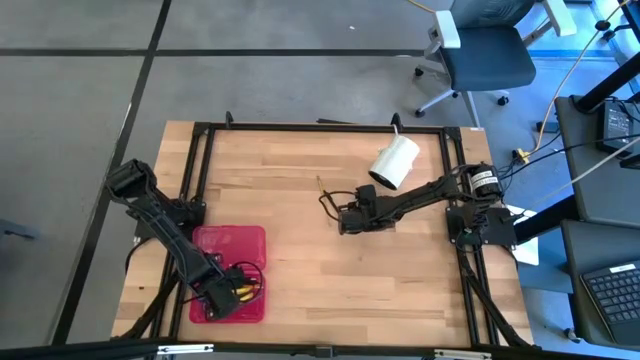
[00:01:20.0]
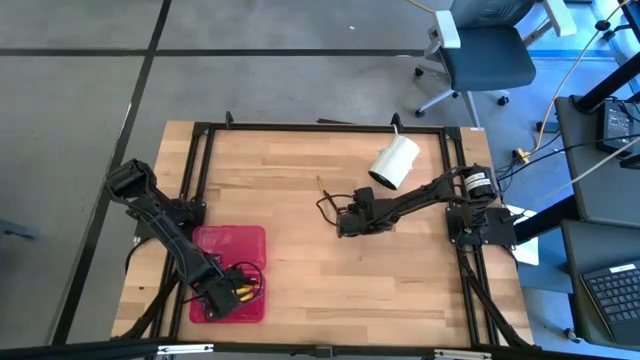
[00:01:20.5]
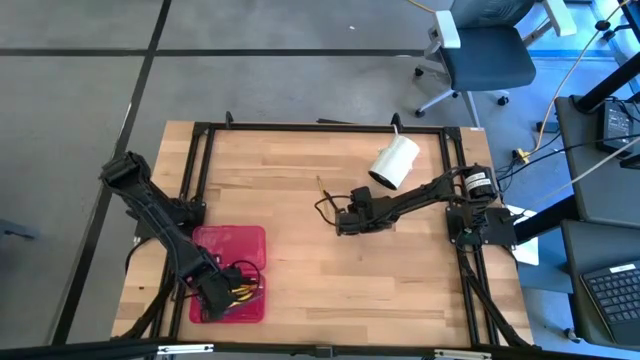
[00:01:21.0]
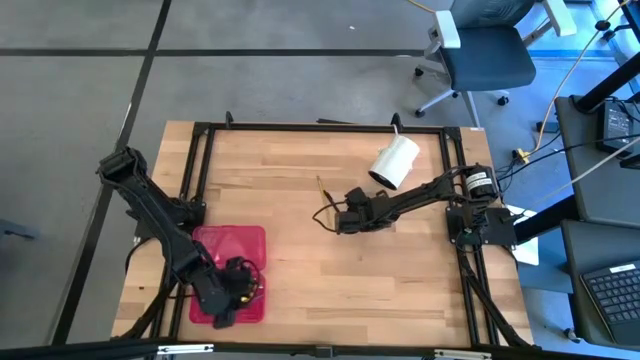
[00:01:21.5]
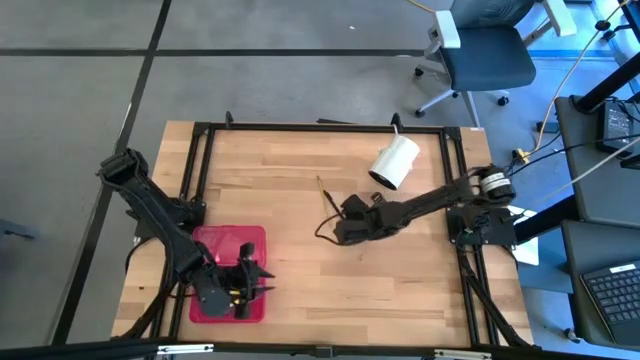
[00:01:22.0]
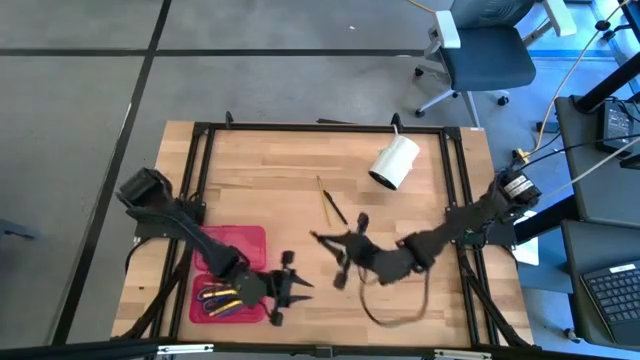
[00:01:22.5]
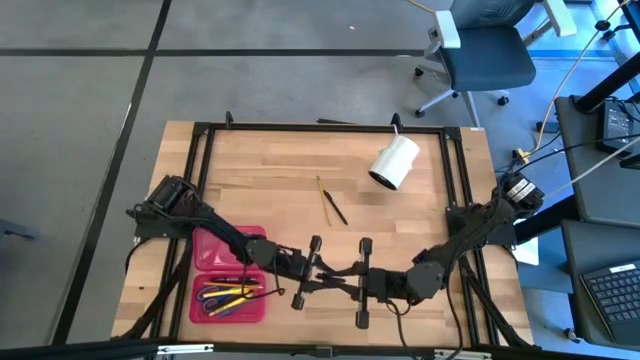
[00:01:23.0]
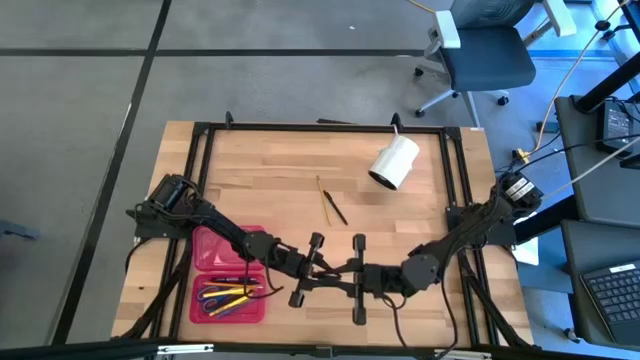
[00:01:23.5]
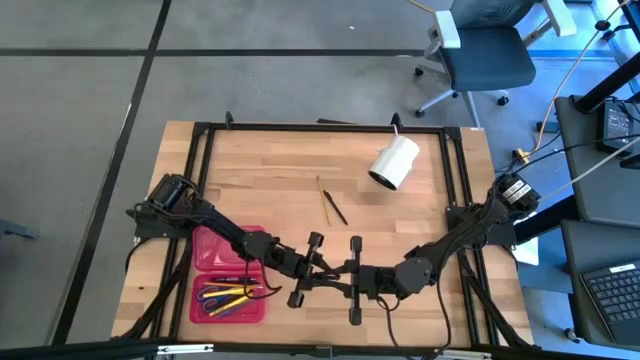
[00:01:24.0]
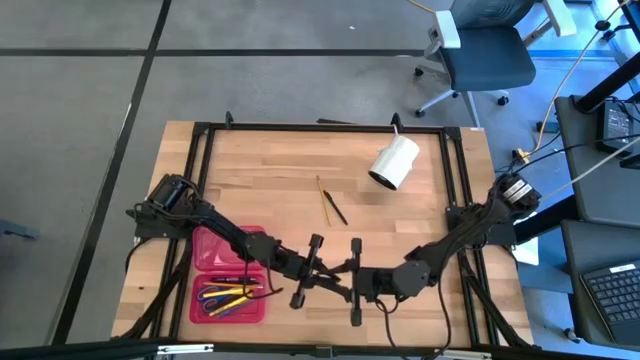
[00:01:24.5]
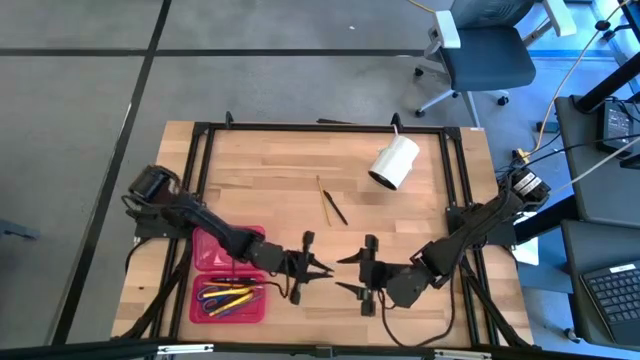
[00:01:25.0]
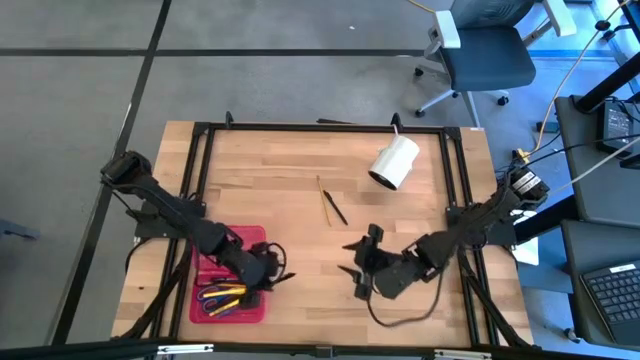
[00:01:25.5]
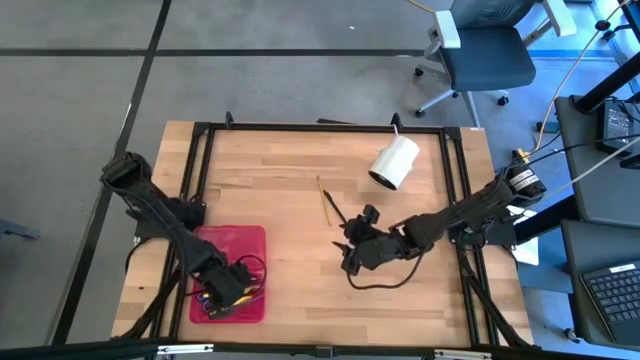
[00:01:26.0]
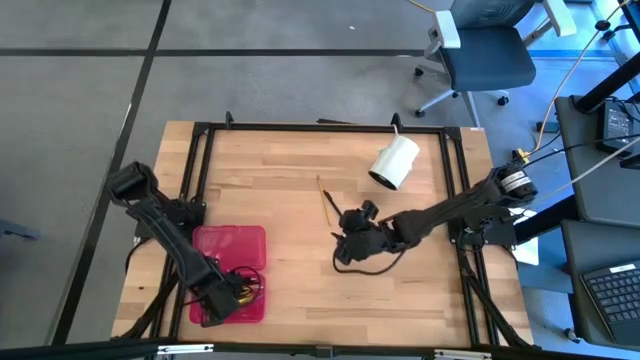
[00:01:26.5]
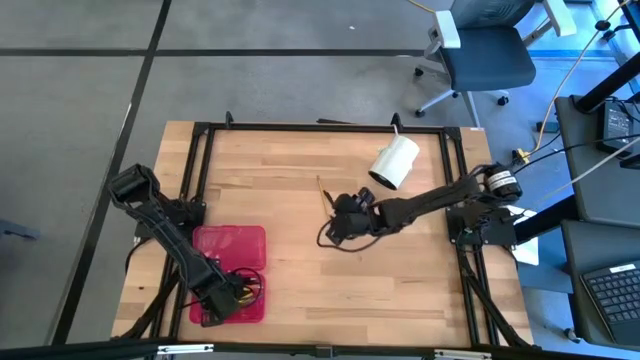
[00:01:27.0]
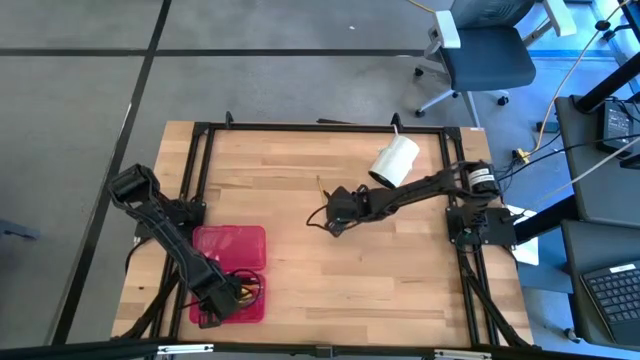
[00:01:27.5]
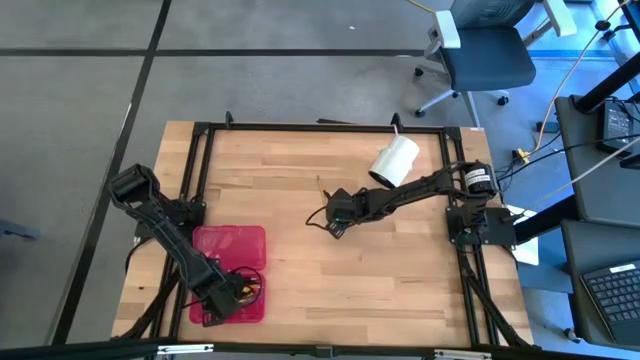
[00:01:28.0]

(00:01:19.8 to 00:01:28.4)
Task: Pick & place school supplies into a supply box
Put the black pen into the red supply box

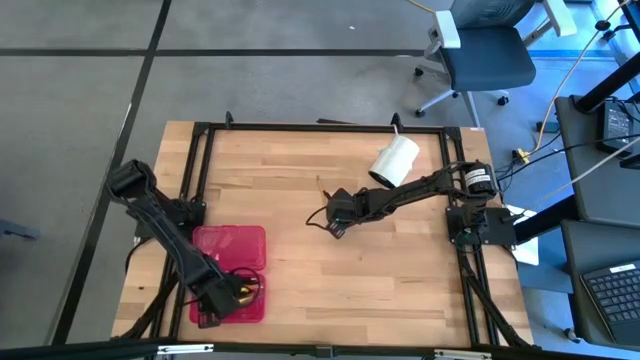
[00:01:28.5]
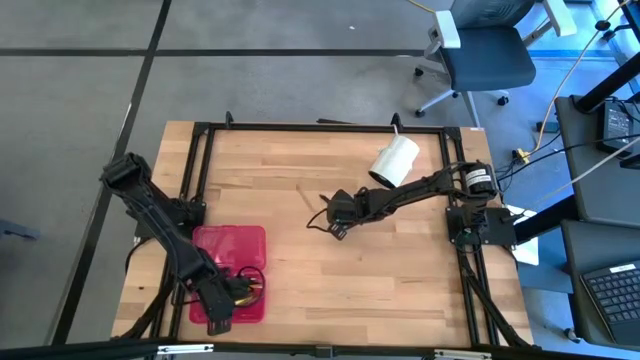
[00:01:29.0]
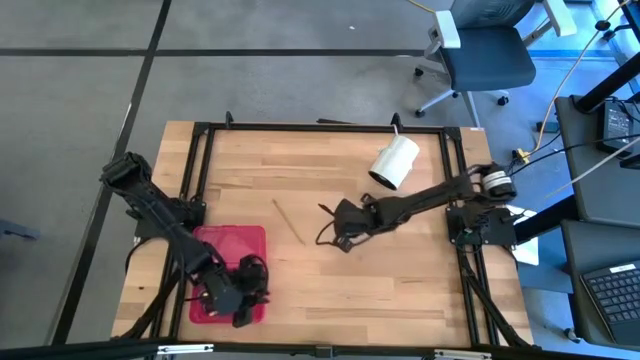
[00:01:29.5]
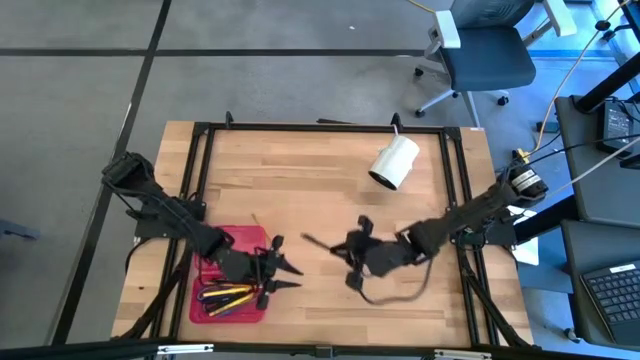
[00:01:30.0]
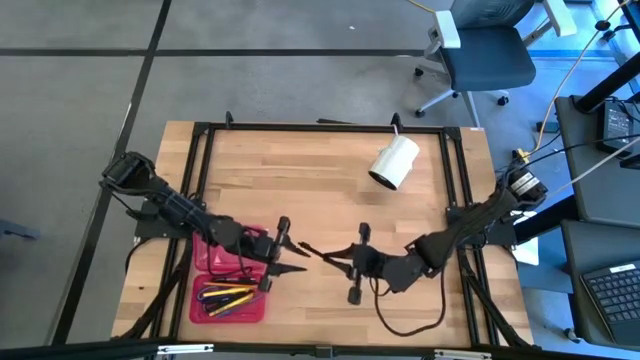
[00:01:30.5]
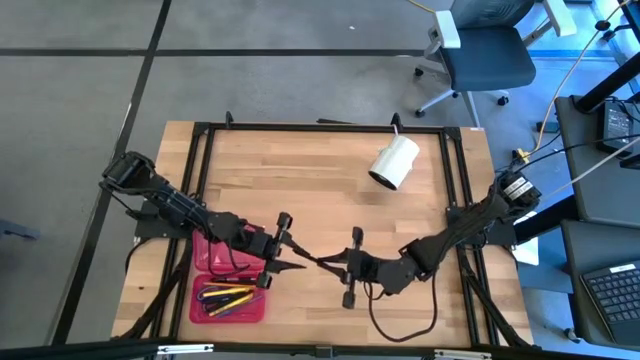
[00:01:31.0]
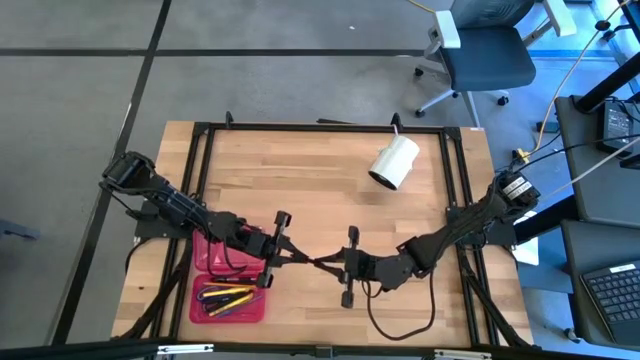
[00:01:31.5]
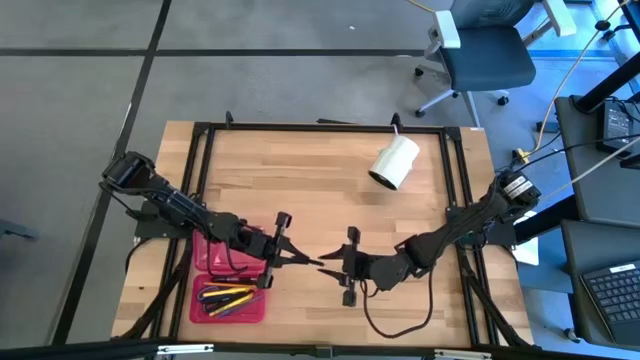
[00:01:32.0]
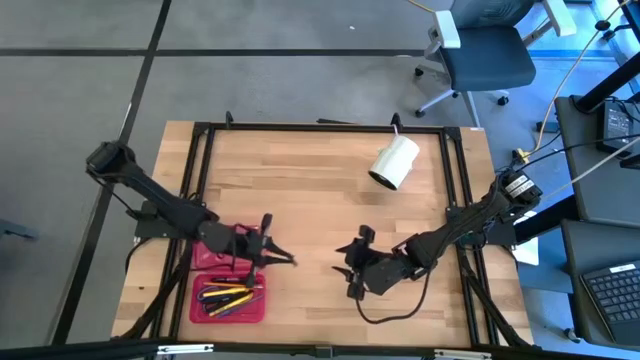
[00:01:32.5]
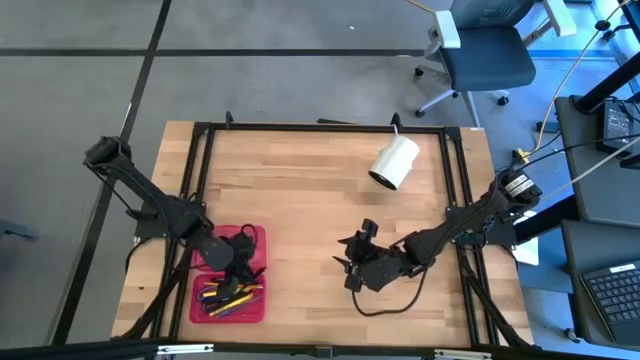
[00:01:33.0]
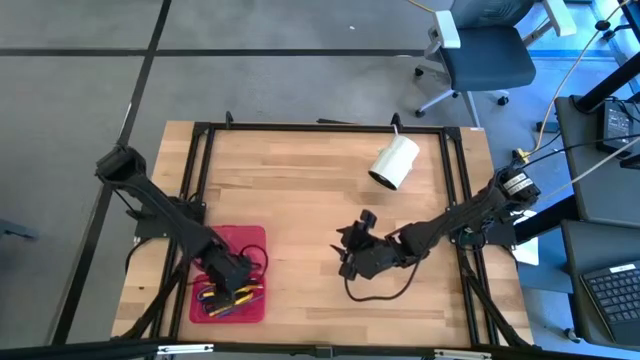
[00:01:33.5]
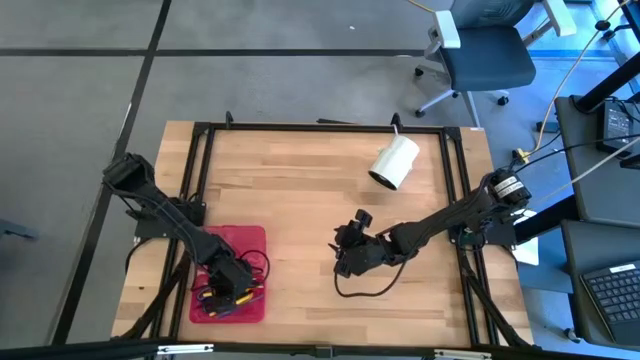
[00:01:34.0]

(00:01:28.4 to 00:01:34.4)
Put the black pen into the red supply box

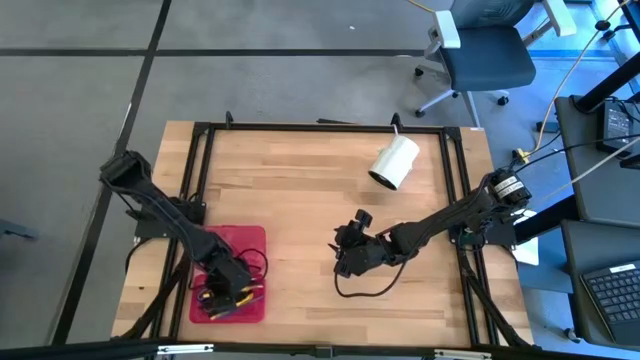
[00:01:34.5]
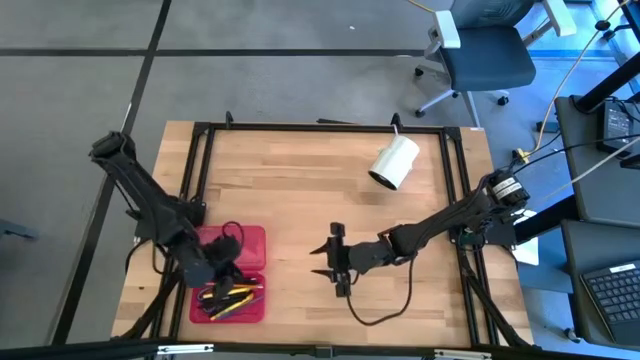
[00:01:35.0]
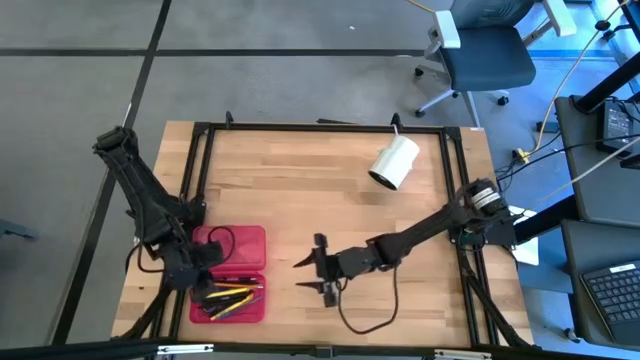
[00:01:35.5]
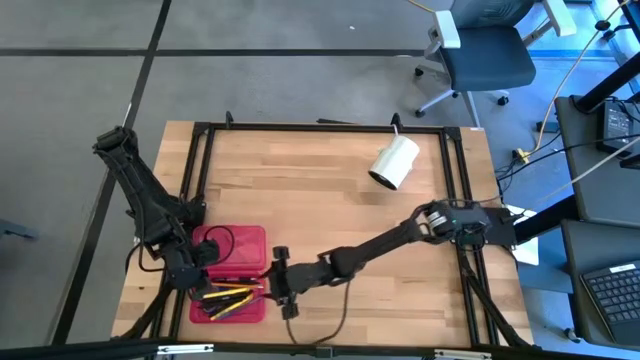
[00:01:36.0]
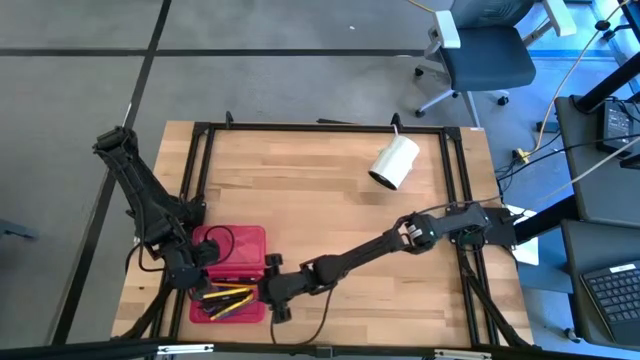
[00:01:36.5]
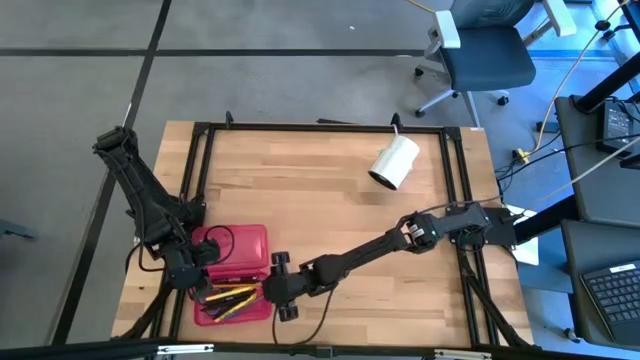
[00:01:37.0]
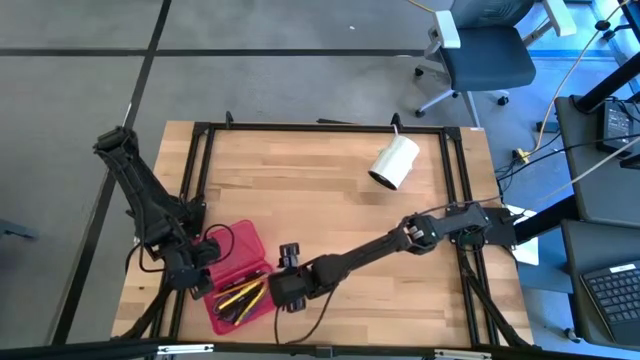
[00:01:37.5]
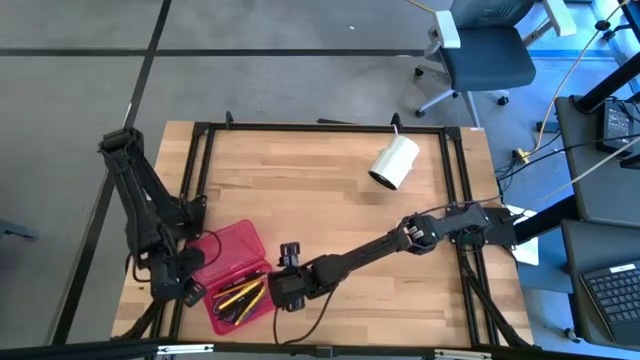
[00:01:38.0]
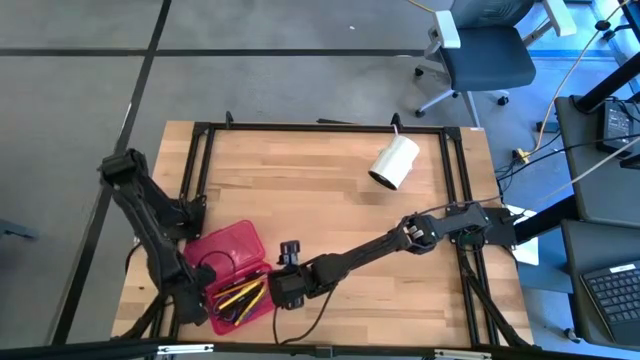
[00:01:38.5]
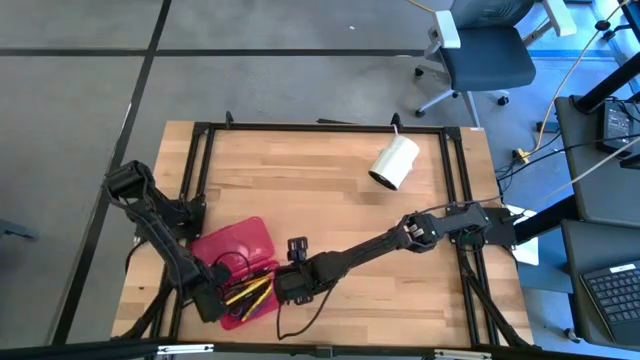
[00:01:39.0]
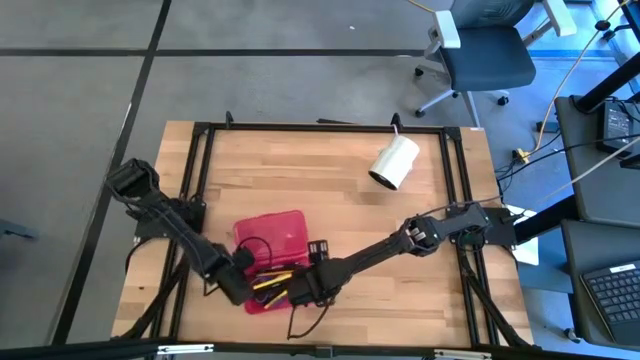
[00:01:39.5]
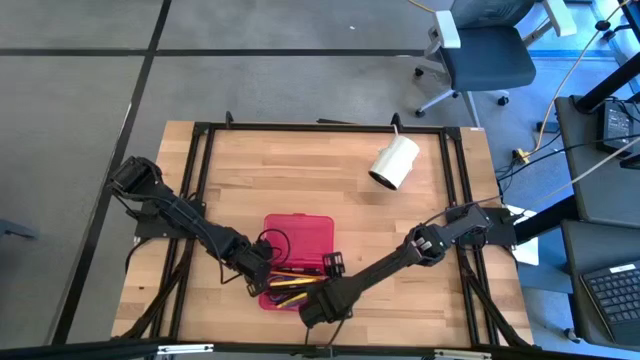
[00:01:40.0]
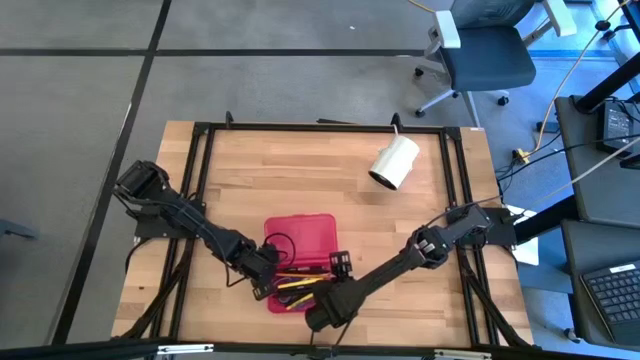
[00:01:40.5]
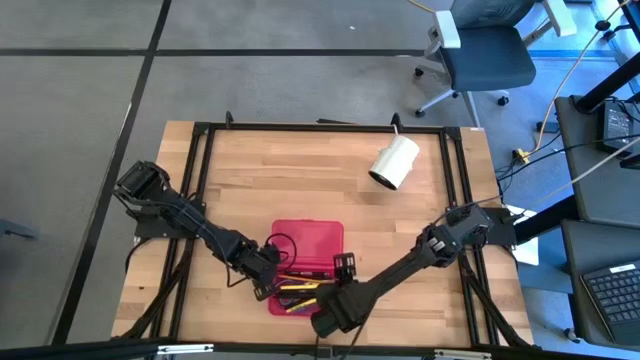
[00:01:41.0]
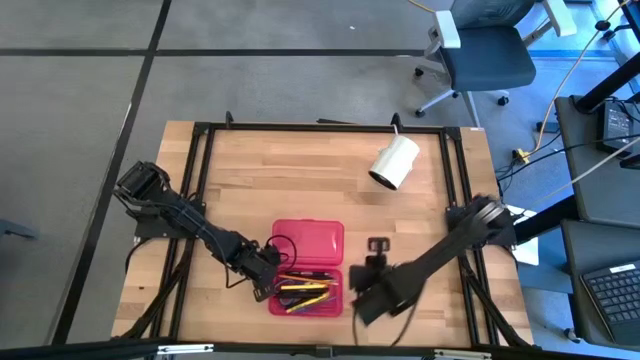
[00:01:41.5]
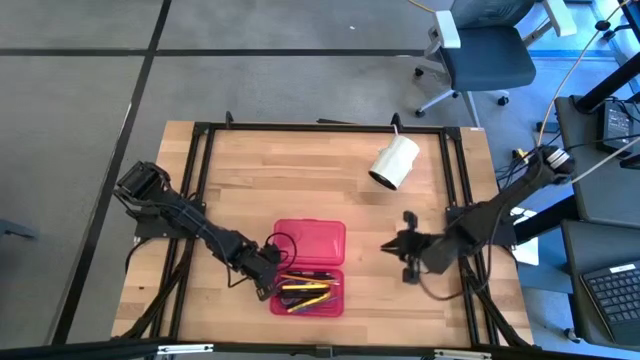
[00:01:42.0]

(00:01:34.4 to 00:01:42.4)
Move the red supply box to the bottom center of the table
